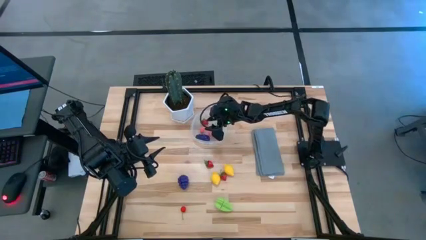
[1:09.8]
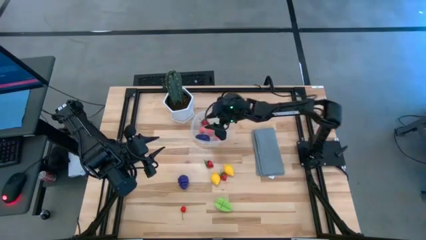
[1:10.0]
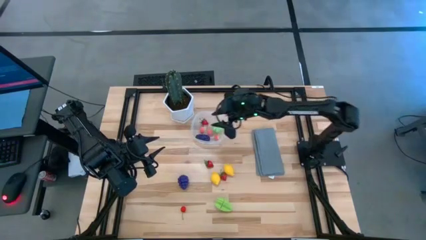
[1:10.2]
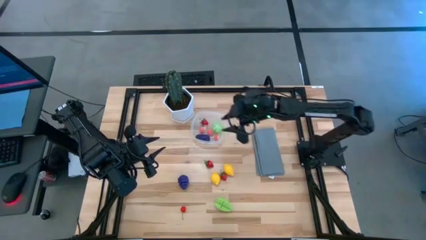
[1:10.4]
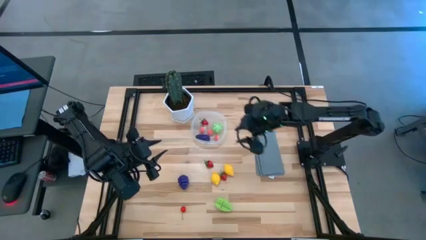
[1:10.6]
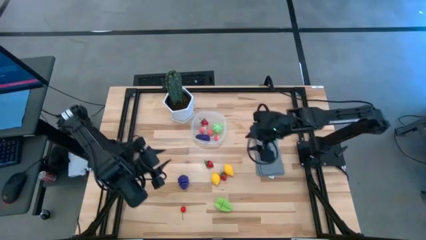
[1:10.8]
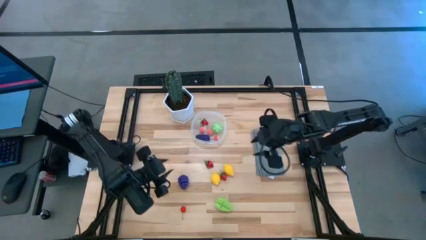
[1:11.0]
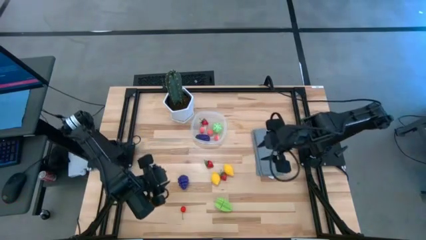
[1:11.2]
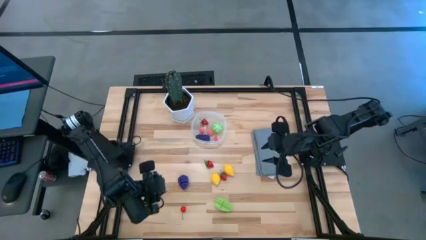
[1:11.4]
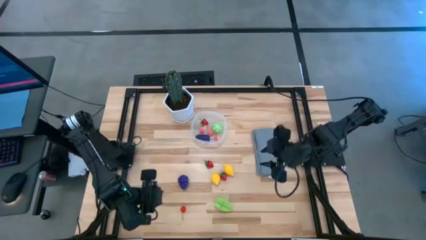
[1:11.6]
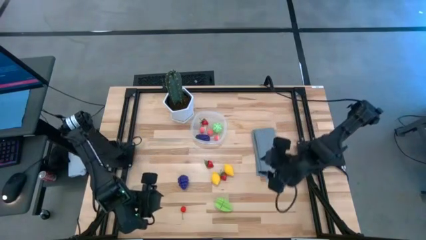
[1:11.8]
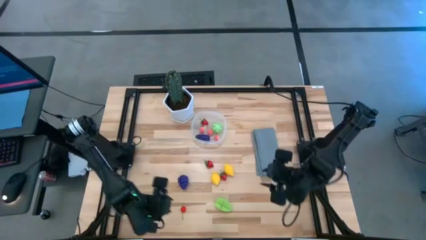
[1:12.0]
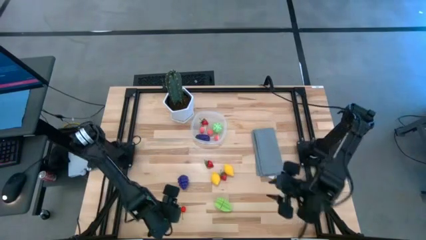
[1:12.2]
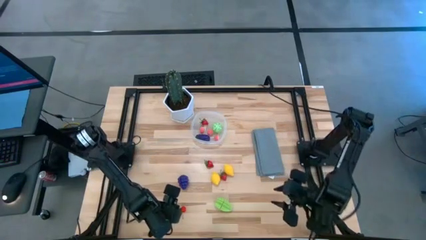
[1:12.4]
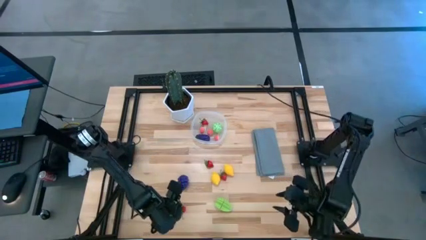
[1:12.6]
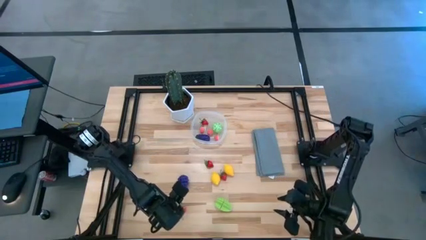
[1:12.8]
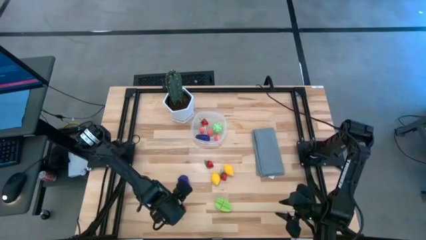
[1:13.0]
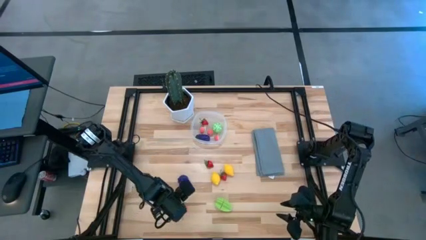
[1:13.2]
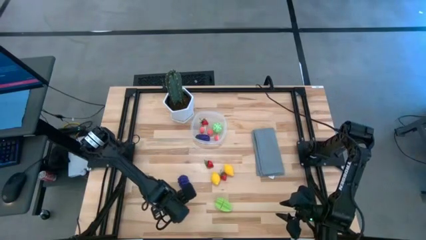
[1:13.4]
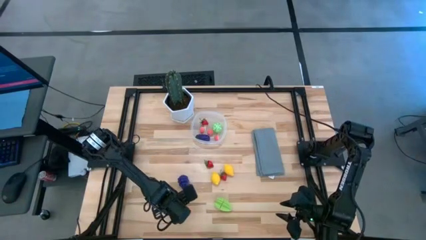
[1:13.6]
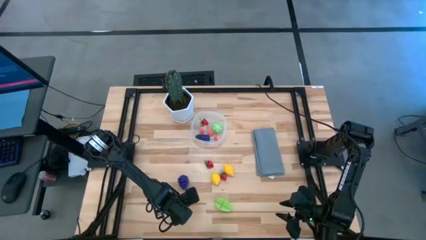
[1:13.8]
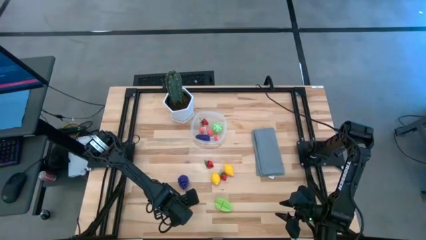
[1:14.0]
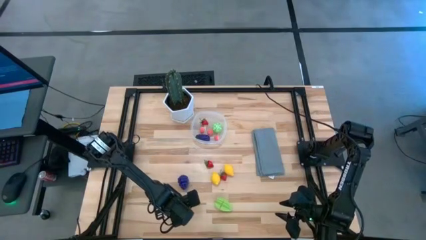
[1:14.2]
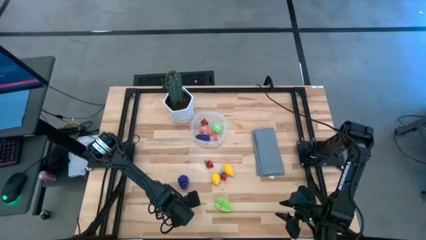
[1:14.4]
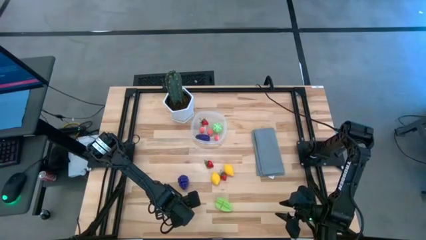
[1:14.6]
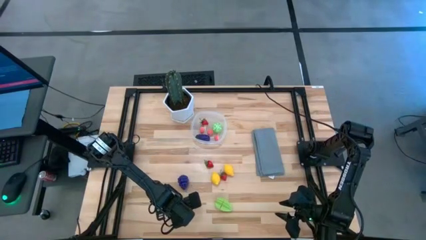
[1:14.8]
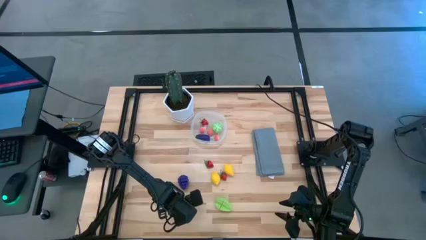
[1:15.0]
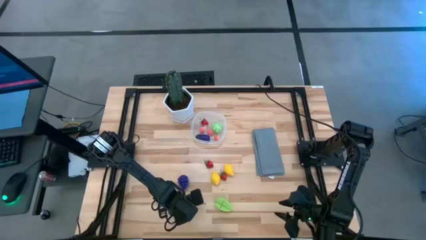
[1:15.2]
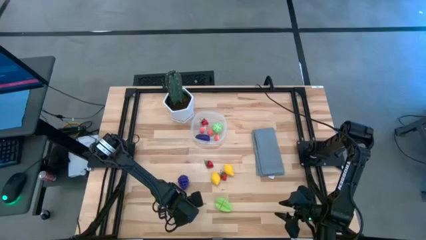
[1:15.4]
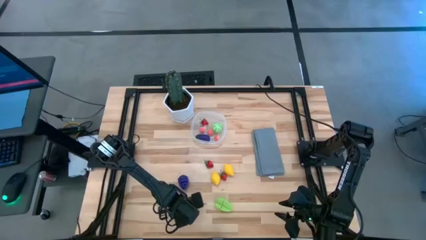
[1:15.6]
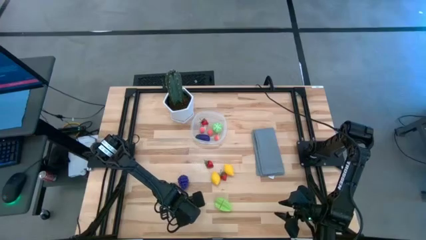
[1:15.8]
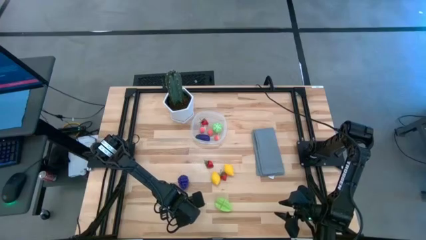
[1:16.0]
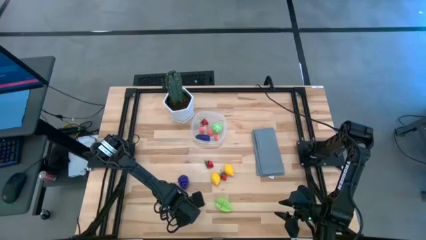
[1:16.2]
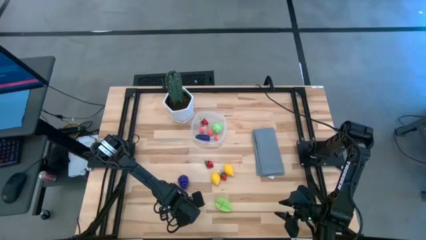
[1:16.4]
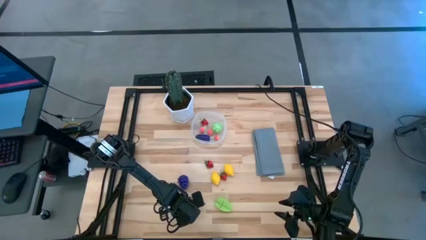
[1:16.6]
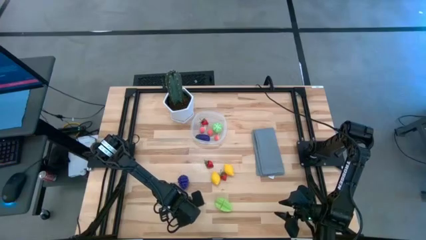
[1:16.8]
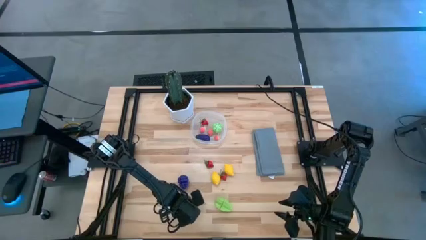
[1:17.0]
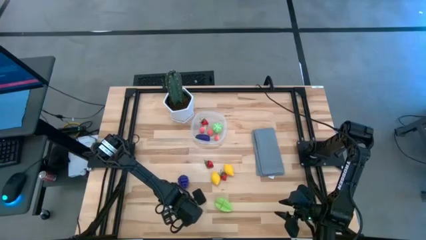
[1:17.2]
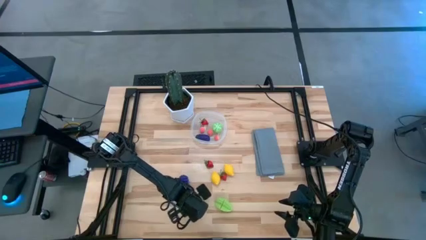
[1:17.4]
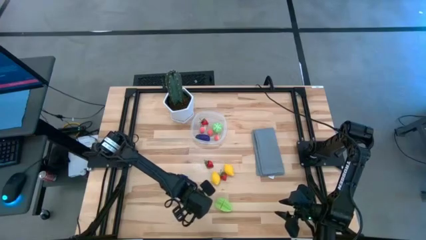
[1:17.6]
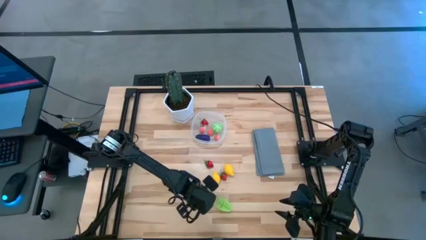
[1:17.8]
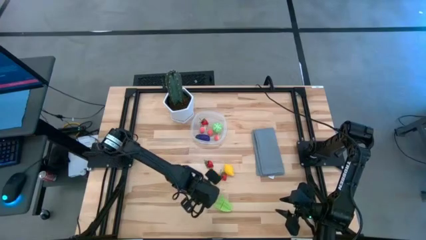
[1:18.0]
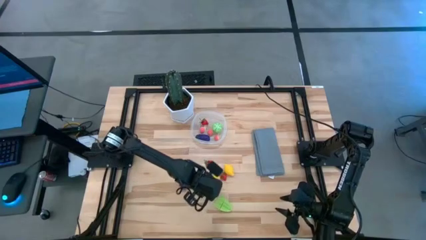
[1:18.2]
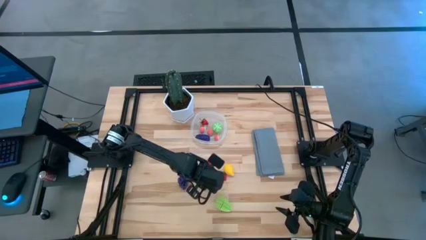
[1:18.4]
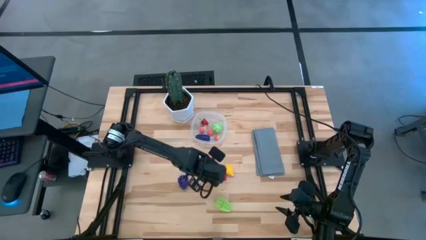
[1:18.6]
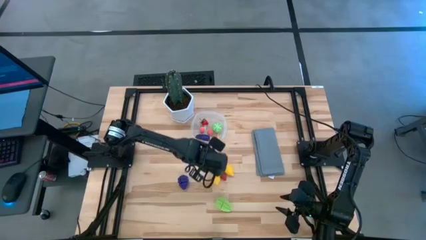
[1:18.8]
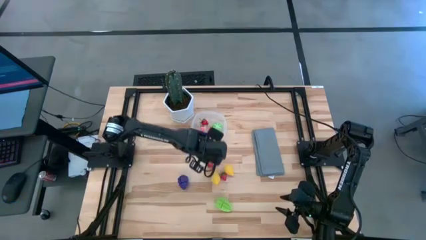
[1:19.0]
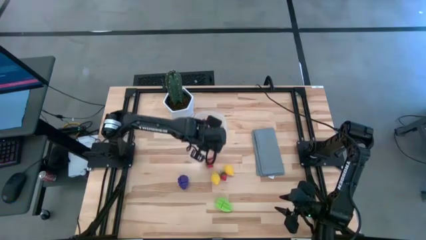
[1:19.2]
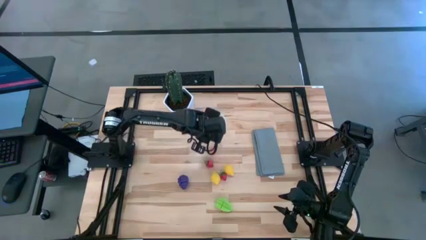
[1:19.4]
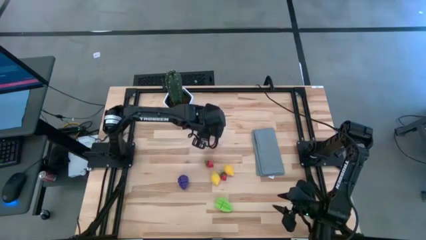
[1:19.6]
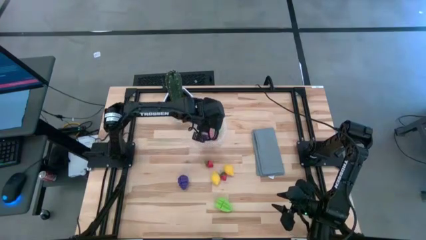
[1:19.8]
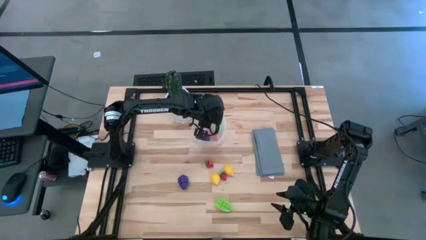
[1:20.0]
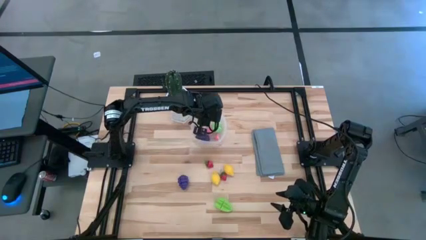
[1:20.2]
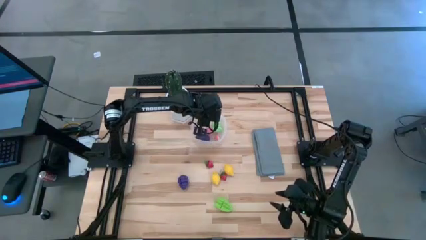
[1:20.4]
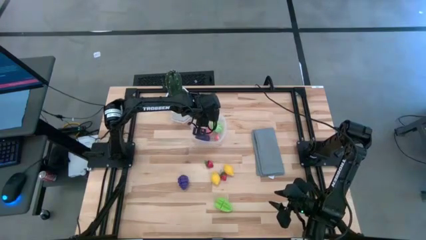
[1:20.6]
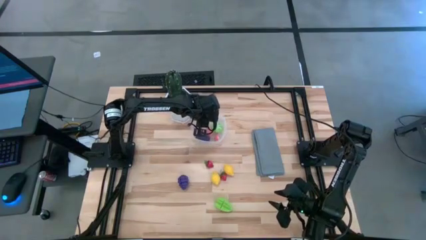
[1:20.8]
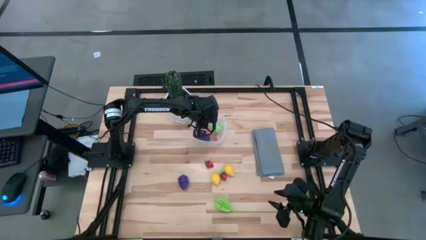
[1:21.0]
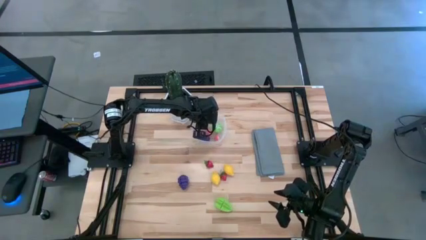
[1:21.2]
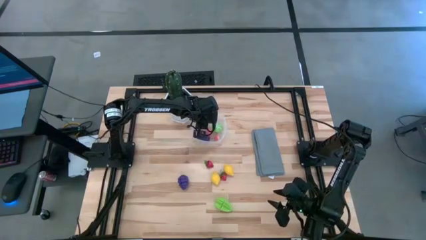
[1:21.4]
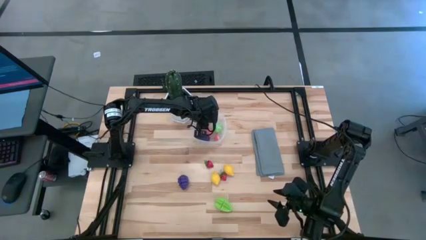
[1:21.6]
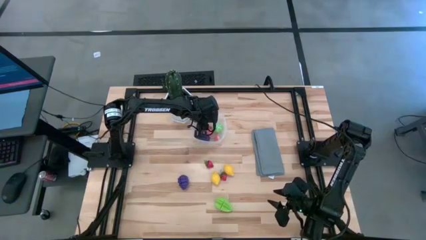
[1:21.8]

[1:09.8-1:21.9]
Task: Pick and placing Produce into tupperware
Put the red cherry into the transparent bin

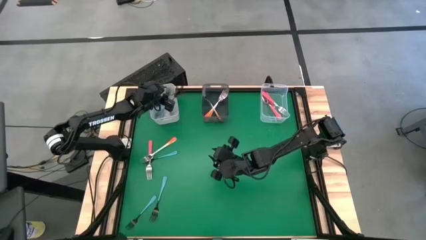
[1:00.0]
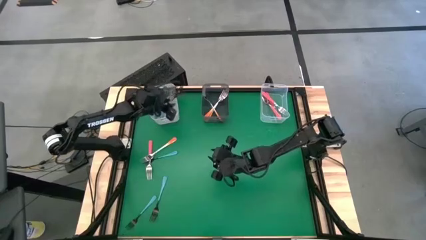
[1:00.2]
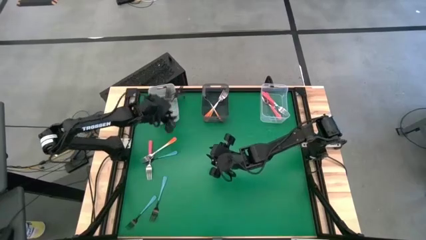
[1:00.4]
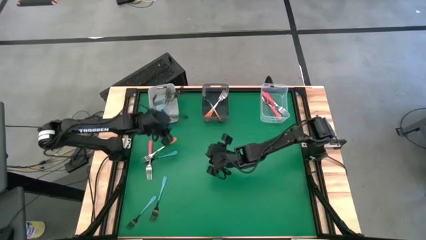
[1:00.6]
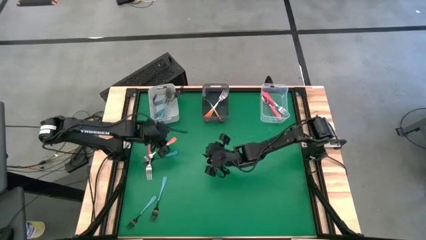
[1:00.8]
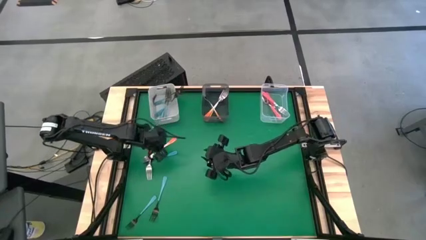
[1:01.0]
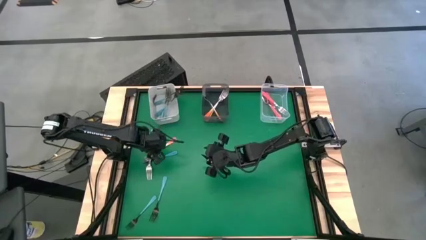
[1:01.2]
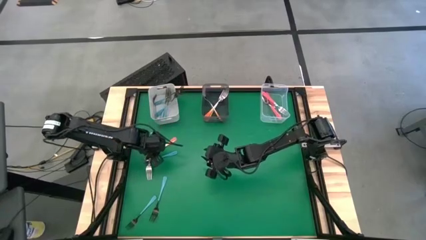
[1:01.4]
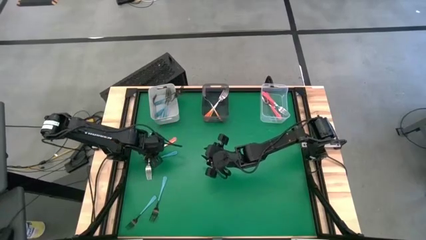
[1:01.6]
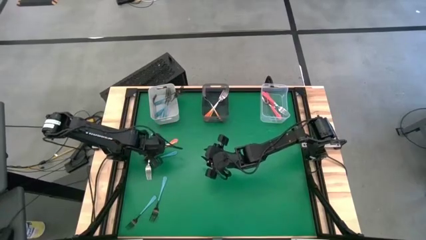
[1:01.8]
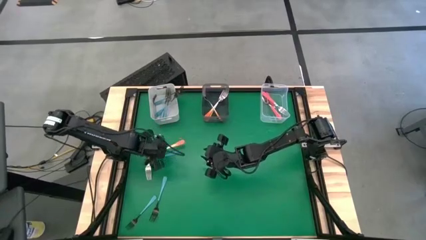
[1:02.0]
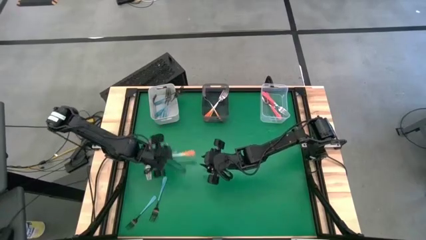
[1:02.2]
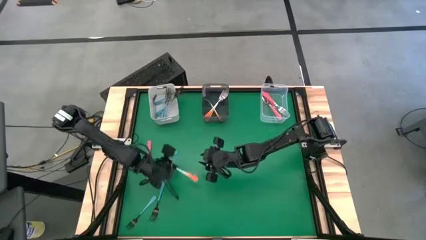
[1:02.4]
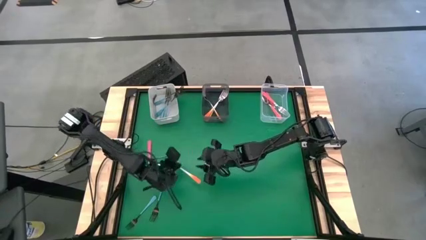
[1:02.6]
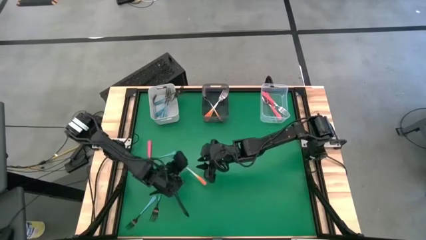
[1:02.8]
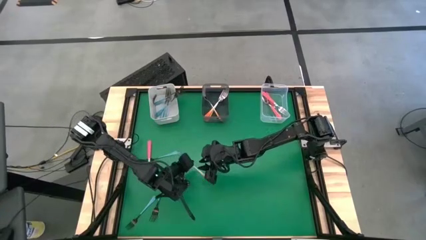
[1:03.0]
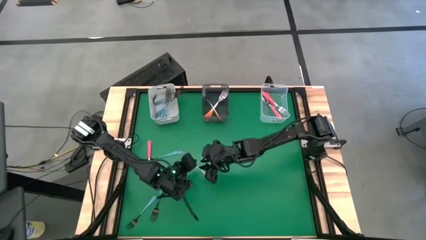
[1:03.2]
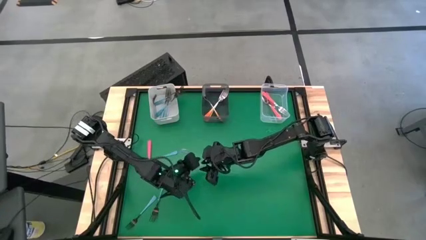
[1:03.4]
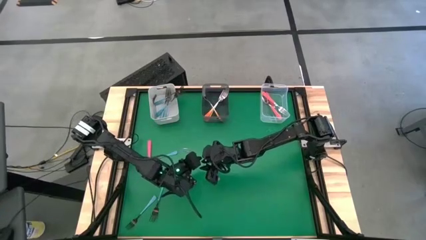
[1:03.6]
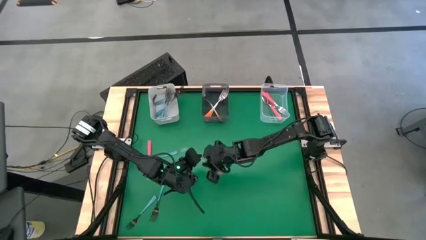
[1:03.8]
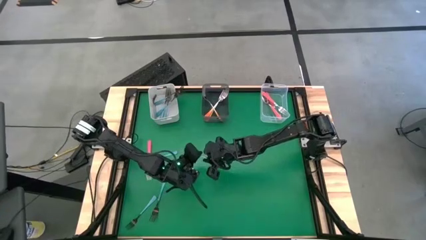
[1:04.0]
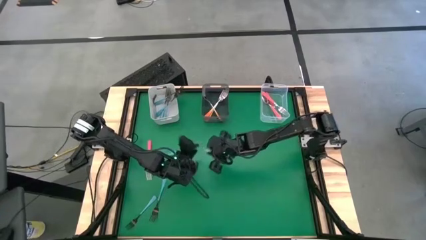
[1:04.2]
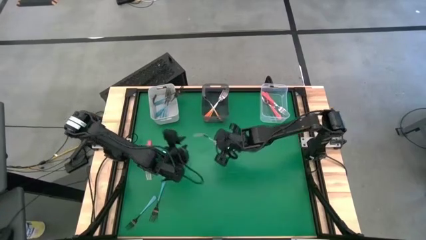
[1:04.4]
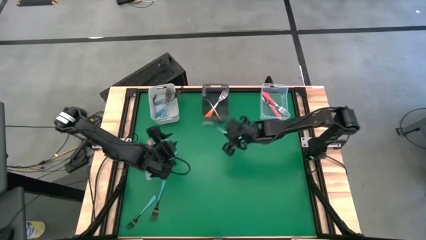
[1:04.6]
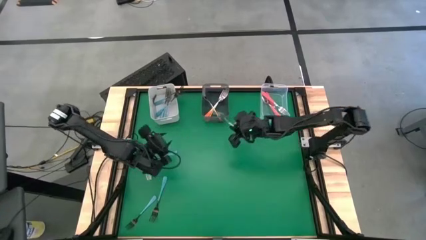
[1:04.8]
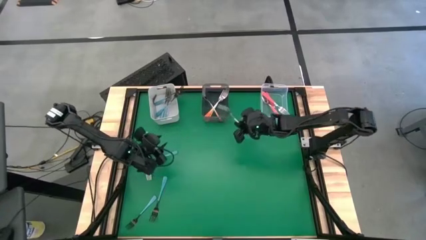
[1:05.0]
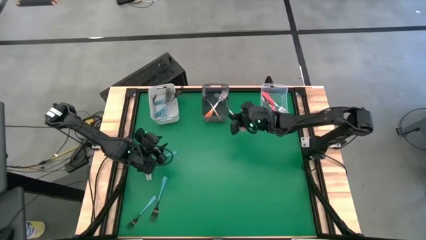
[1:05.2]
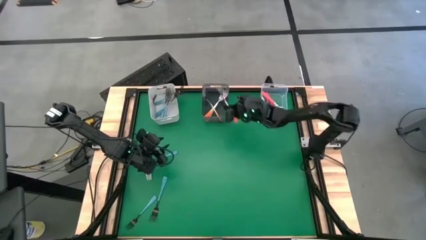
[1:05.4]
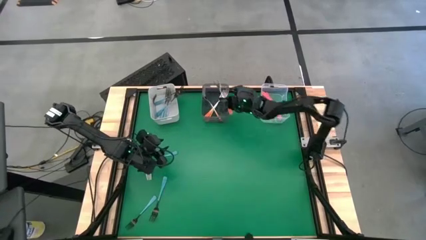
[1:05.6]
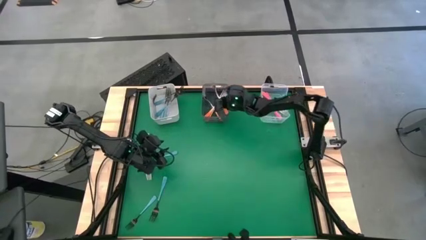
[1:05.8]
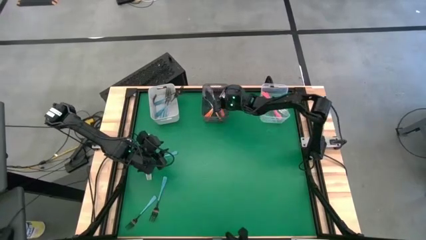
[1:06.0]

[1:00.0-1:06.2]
Task: Sort silverware by color (type)
Put the orange fork into the black bin
